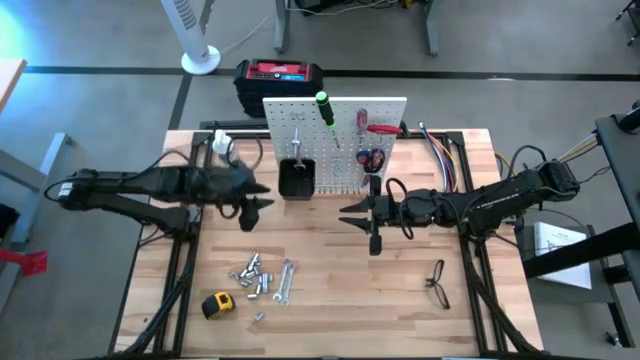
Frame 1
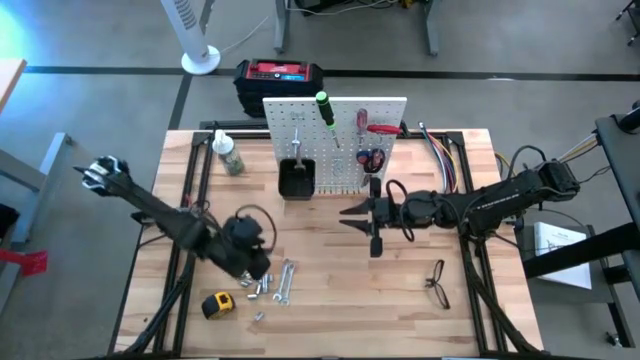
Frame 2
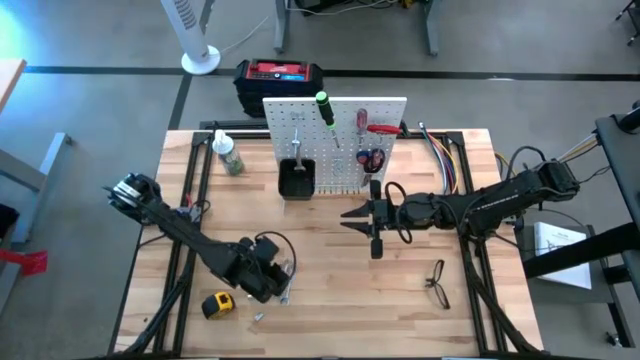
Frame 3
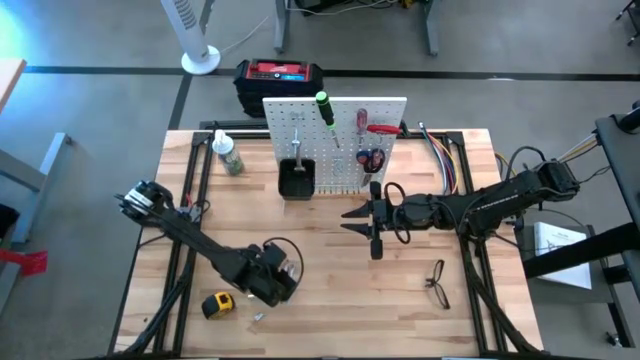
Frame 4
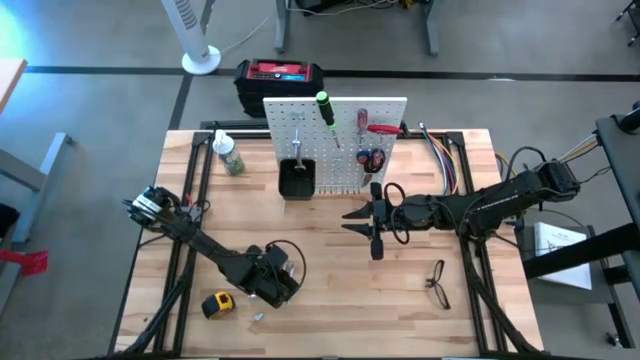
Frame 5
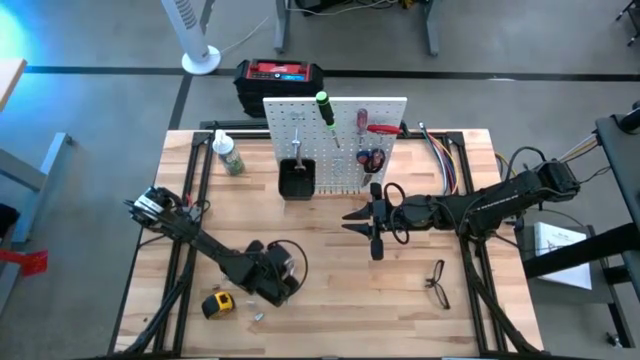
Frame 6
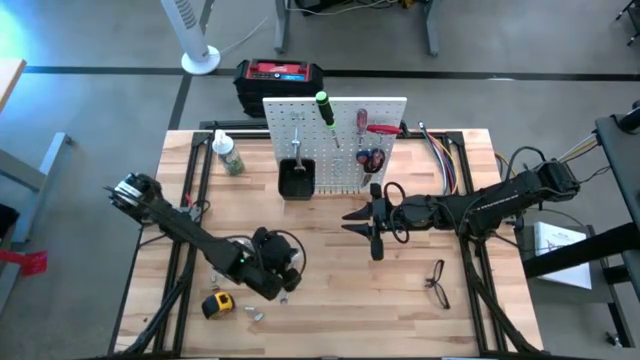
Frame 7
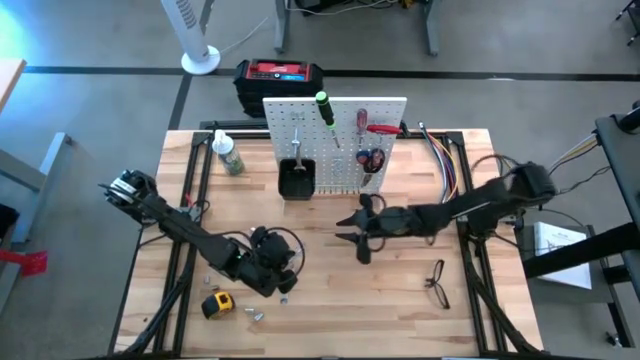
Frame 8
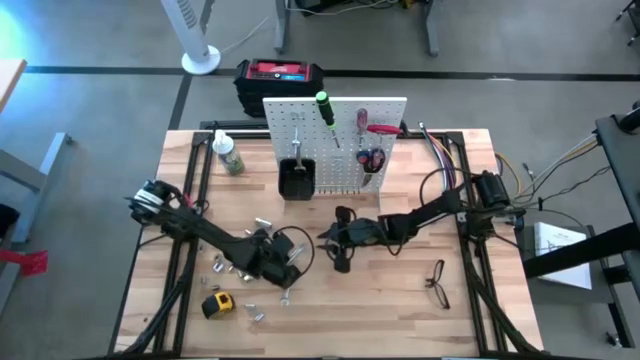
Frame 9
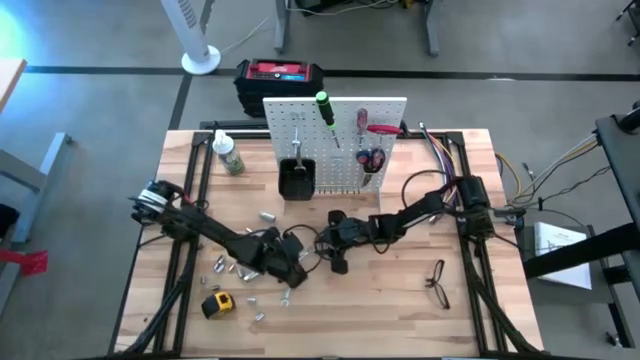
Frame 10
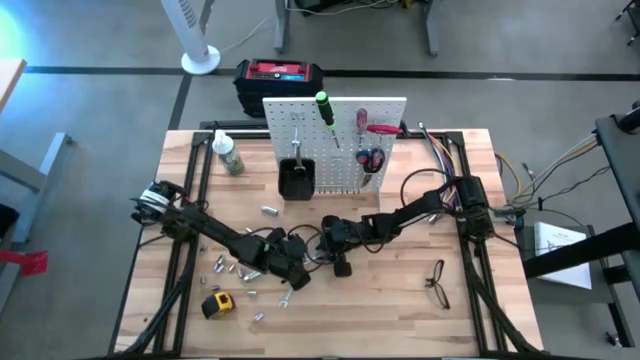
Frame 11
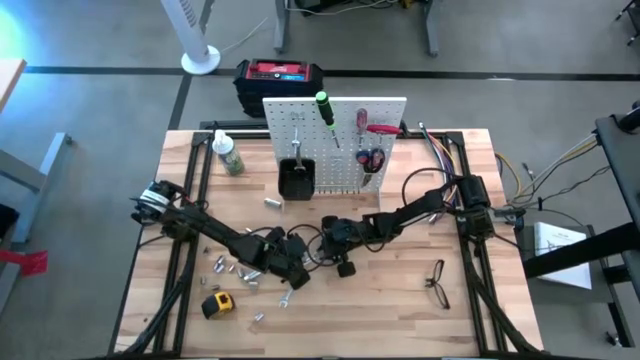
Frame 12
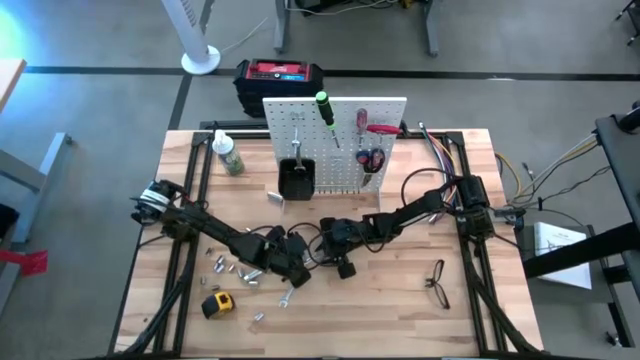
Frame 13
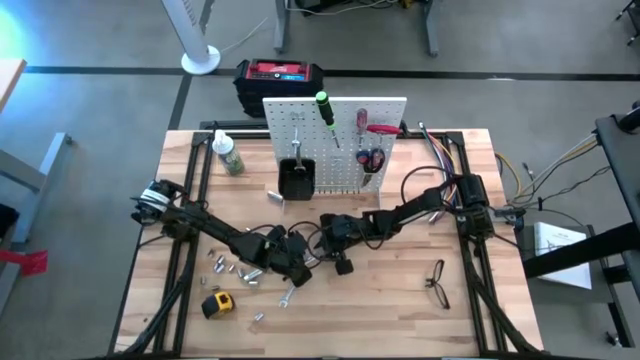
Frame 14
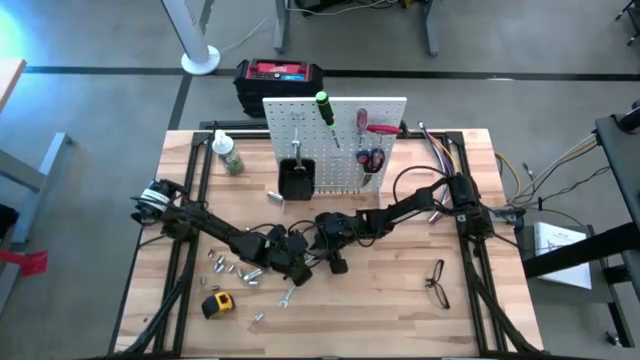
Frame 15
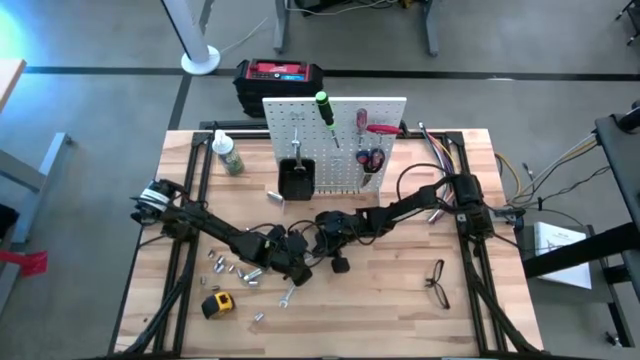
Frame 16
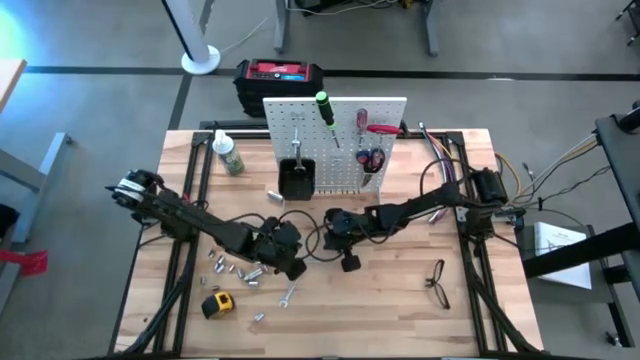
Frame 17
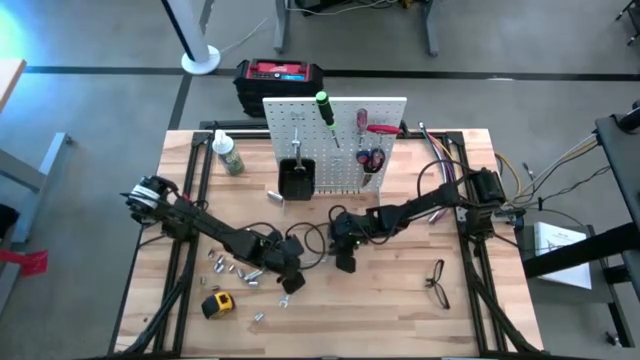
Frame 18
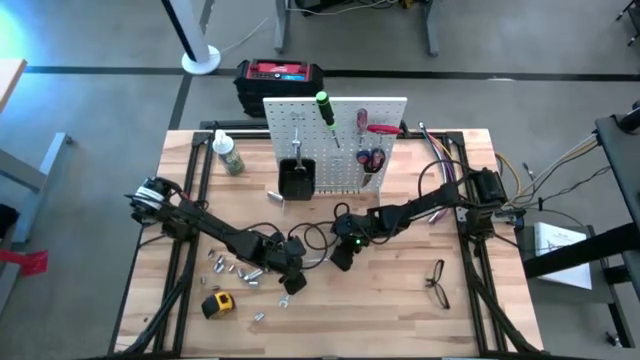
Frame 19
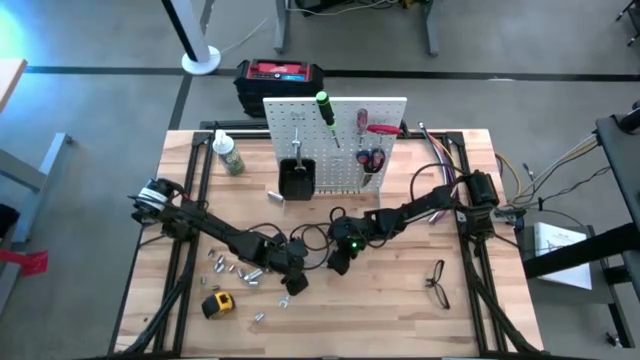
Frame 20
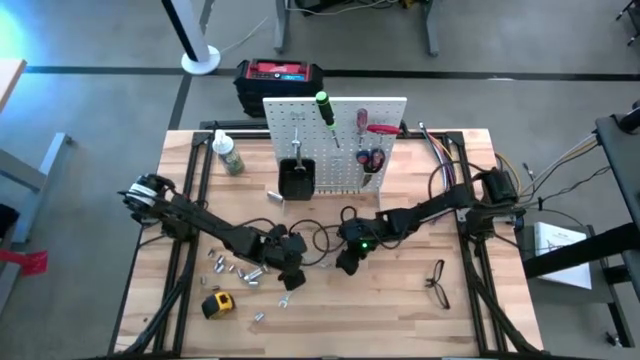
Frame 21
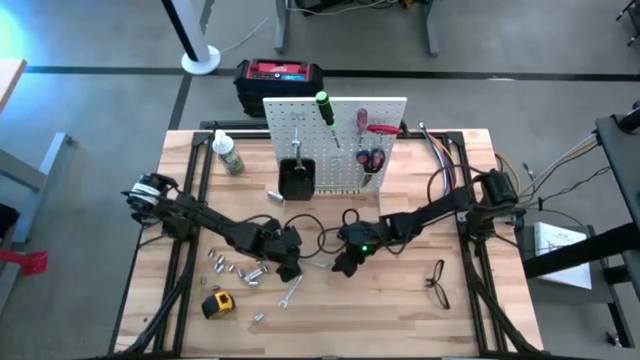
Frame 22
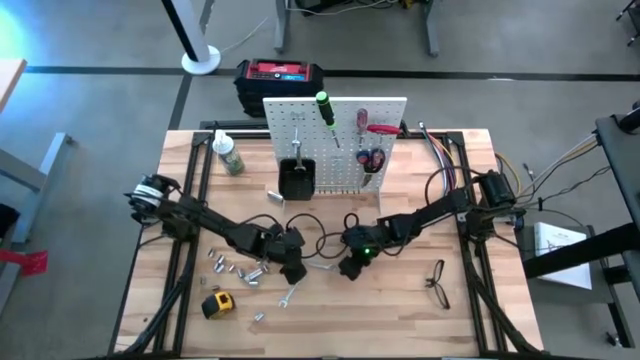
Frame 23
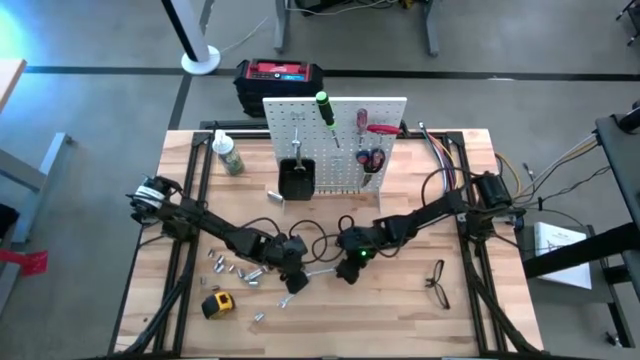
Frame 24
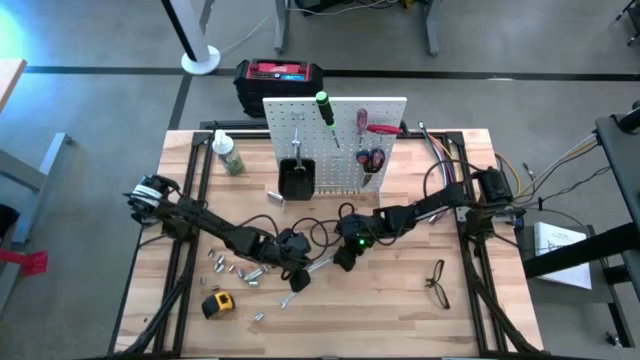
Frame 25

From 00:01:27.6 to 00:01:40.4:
Task: Hang tools onto peg board
Hang the left silver wrench on the pegboard

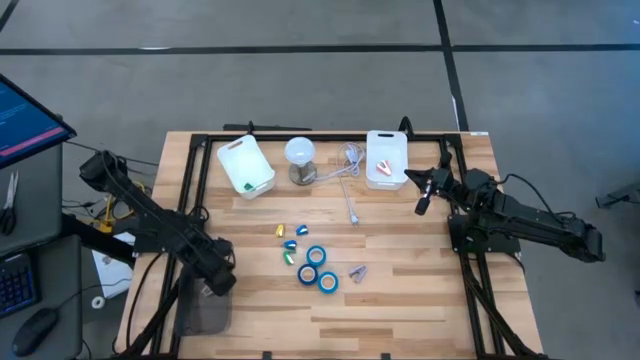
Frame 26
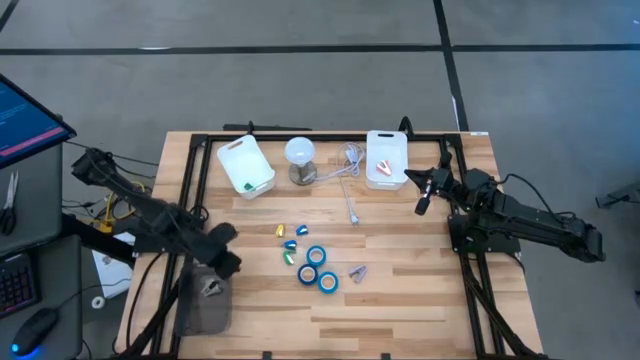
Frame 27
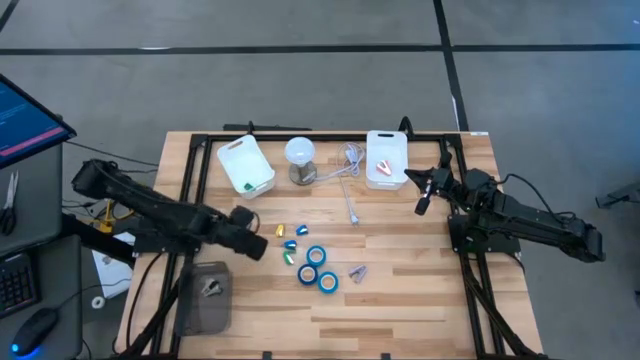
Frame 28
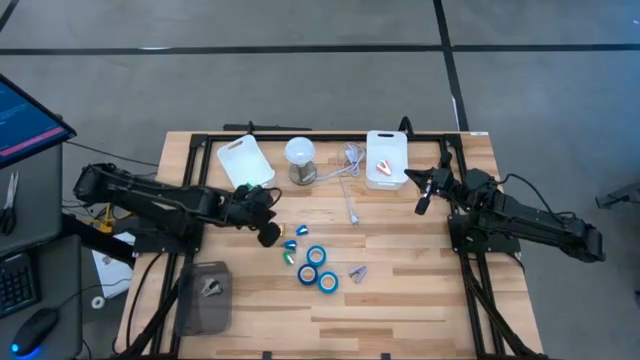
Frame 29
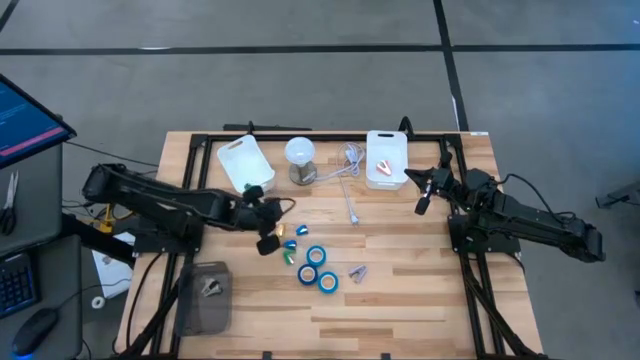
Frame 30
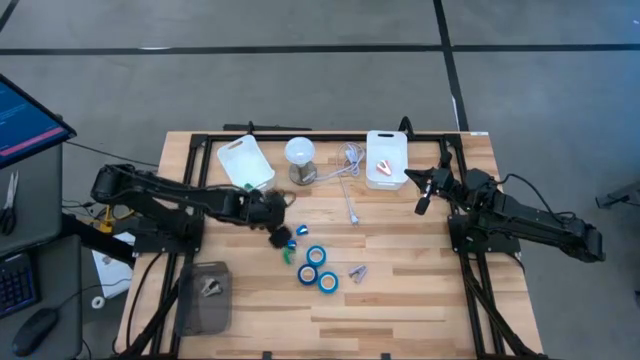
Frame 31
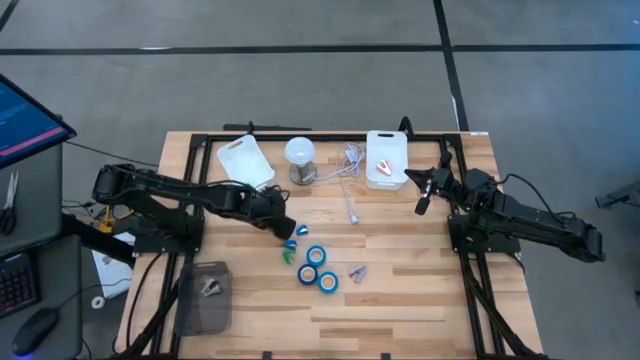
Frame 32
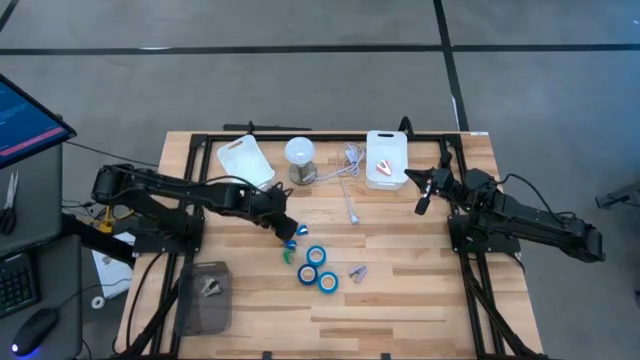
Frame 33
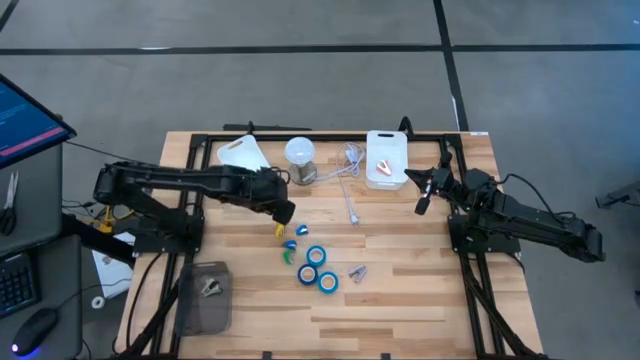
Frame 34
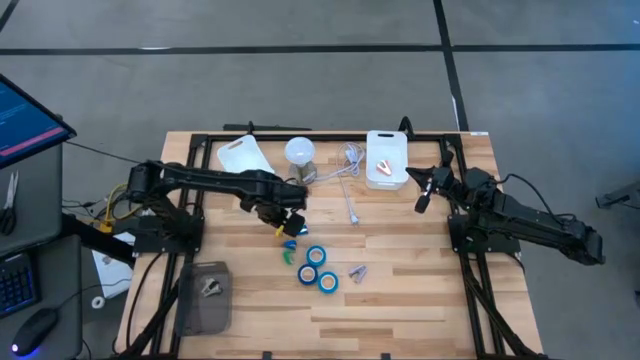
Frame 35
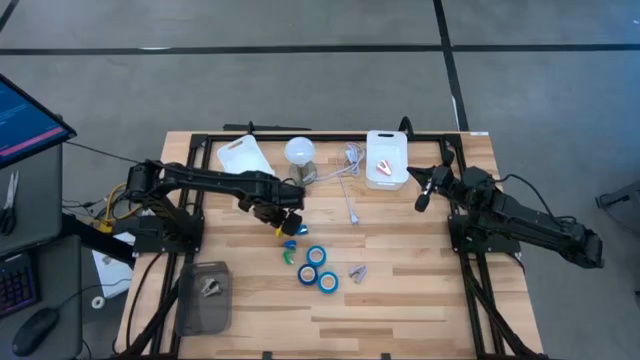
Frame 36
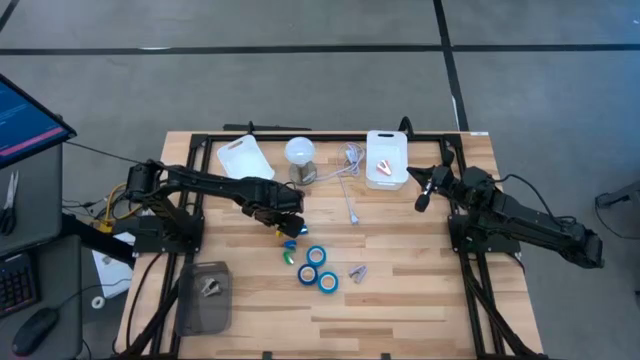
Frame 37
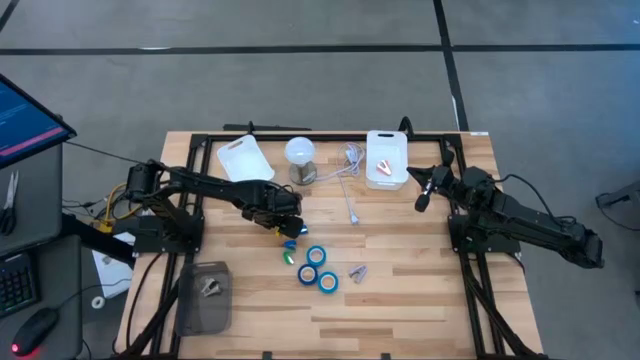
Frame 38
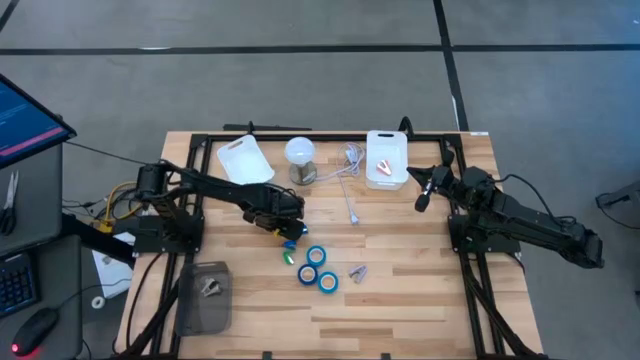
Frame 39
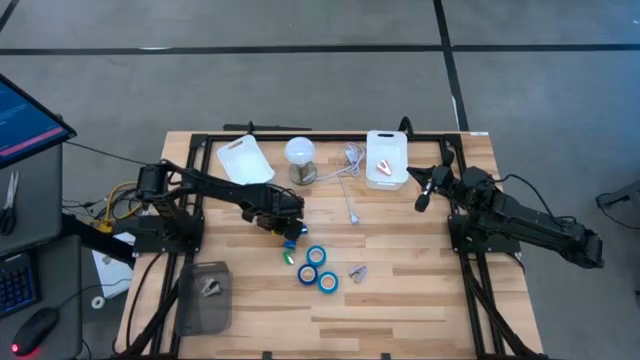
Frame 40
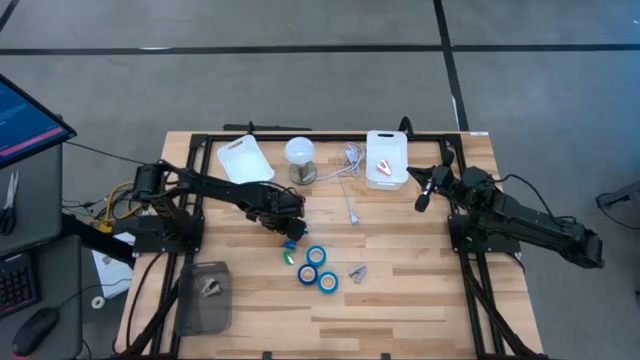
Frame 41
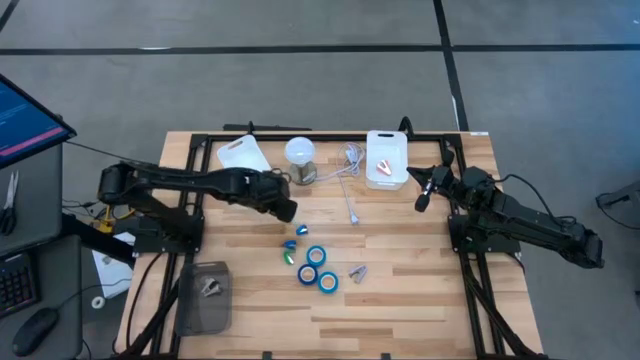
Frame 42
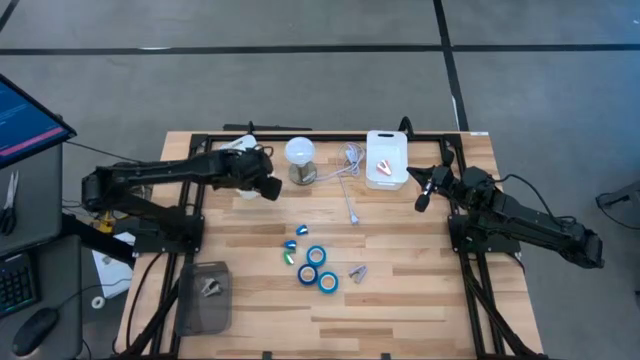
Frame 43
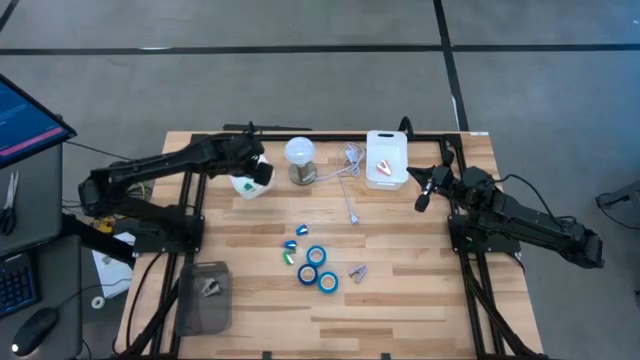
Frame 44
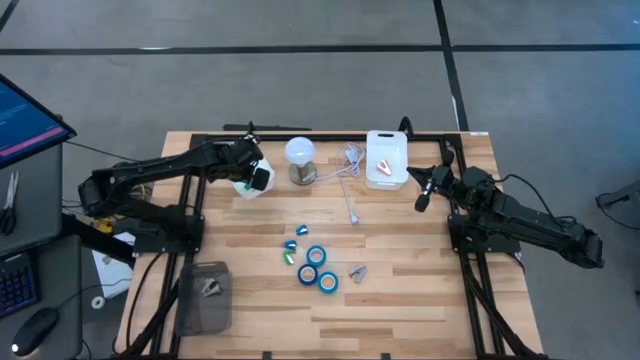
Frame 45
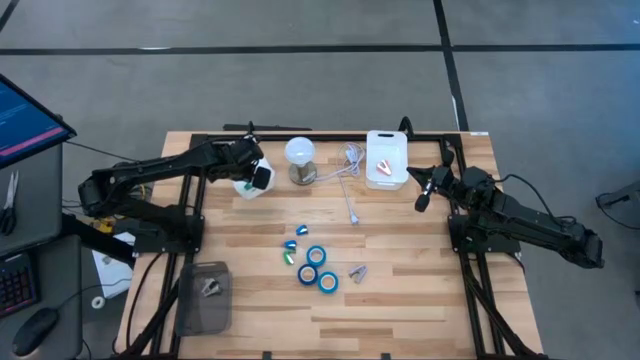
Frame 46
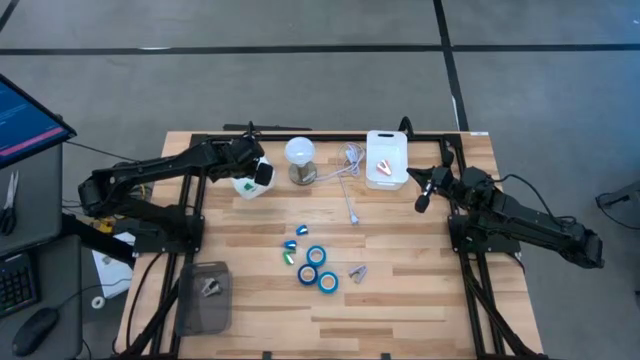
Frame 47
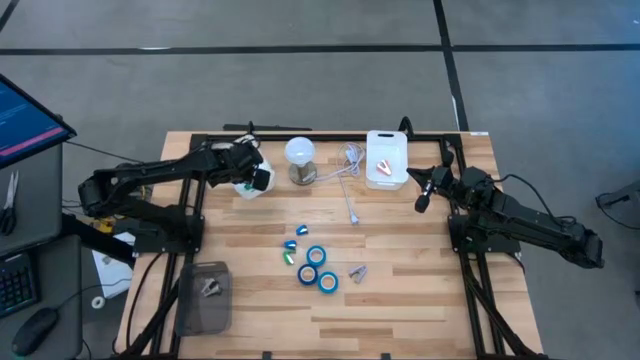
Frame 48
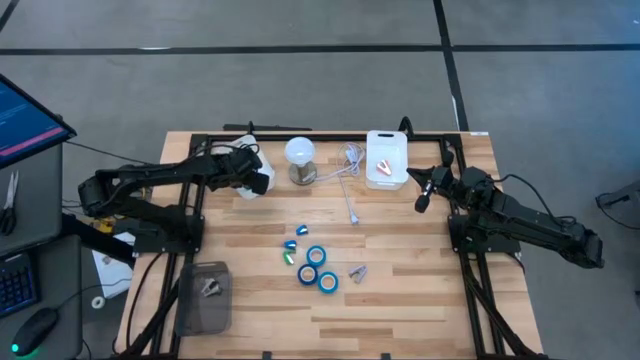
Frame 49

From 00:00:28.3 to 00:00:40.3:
Task: Pick and place Stapler, Stapler remover, tape
Put the yellow stapler into the left white bin
